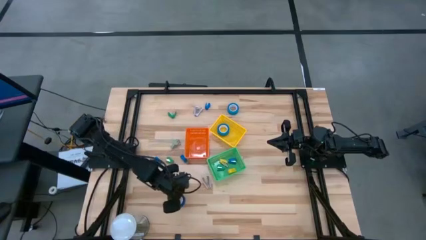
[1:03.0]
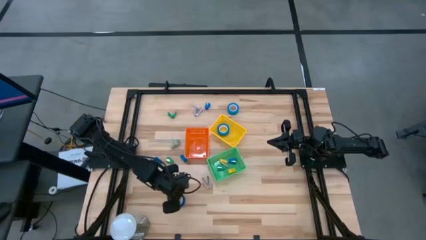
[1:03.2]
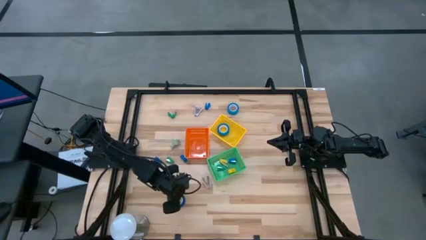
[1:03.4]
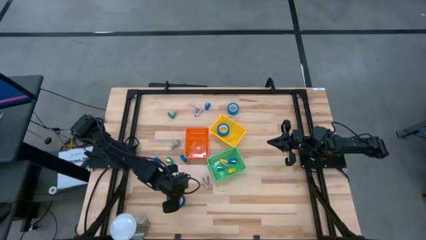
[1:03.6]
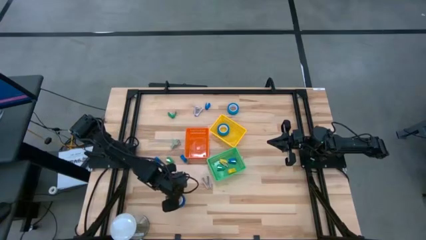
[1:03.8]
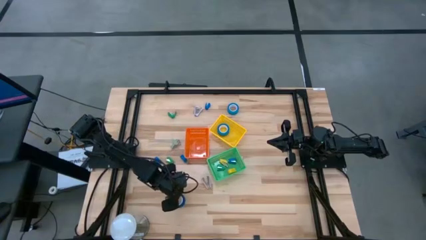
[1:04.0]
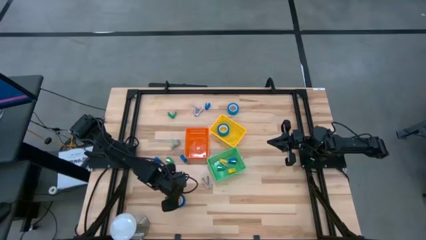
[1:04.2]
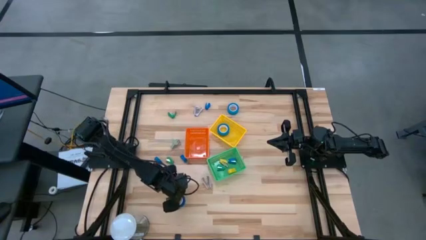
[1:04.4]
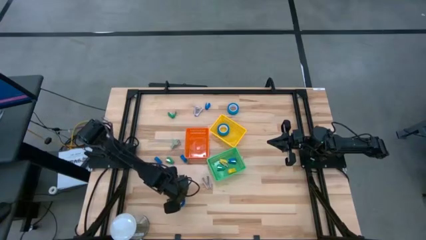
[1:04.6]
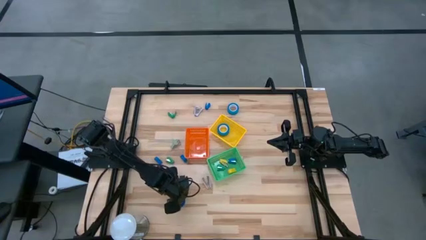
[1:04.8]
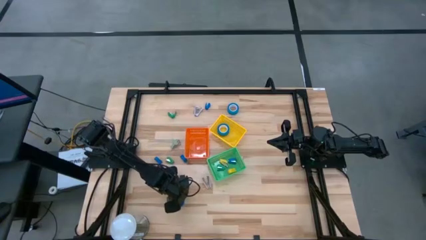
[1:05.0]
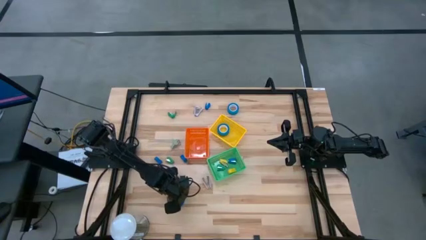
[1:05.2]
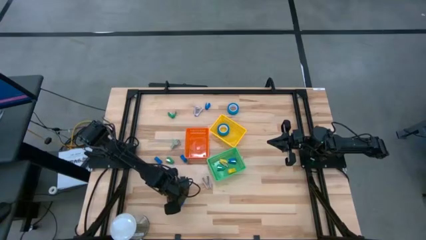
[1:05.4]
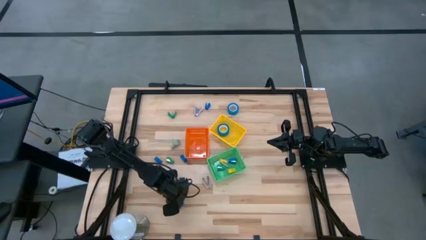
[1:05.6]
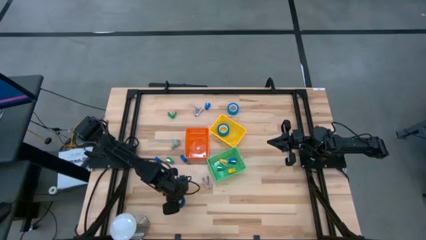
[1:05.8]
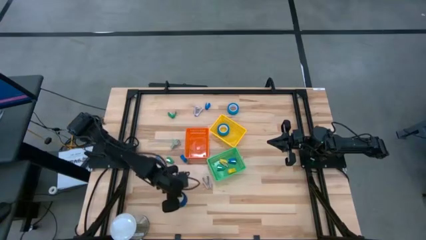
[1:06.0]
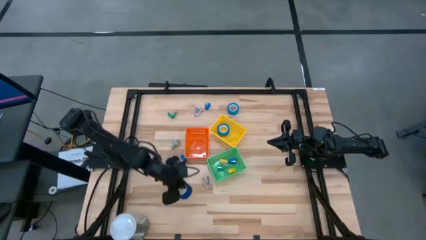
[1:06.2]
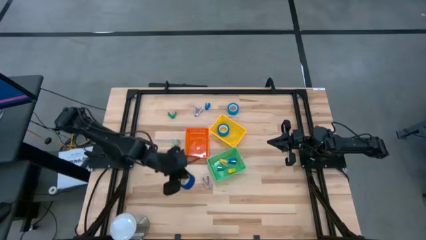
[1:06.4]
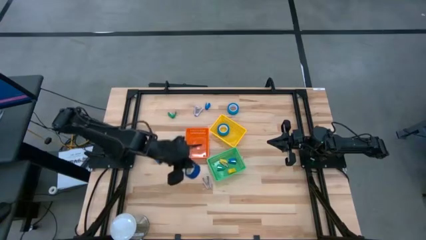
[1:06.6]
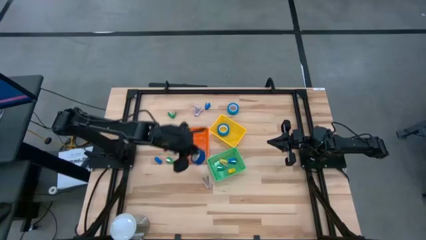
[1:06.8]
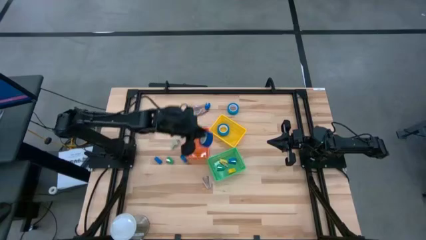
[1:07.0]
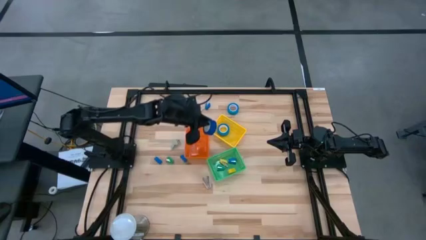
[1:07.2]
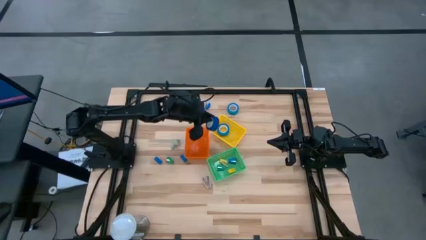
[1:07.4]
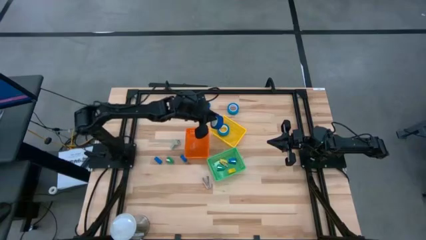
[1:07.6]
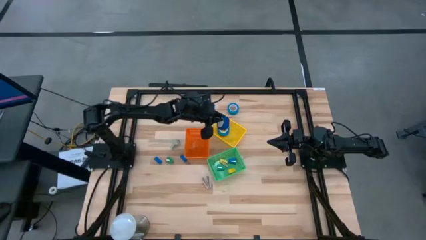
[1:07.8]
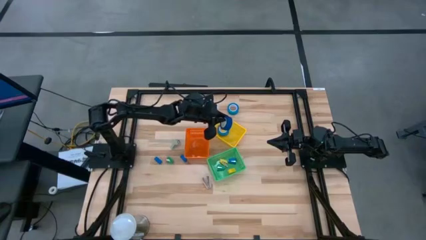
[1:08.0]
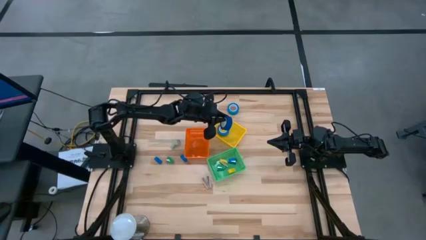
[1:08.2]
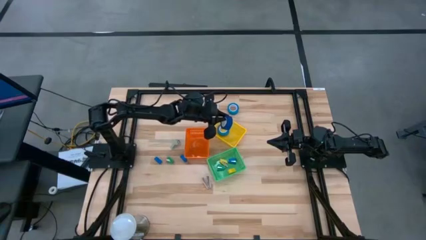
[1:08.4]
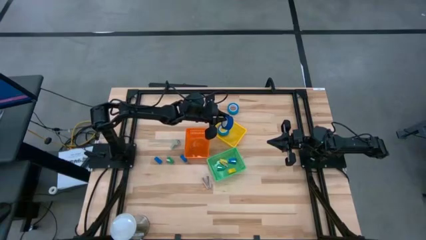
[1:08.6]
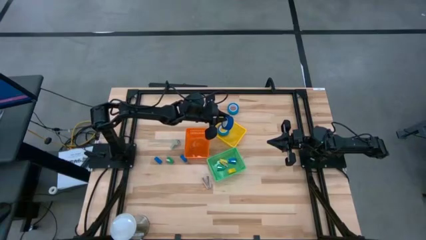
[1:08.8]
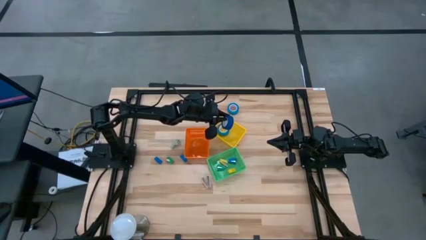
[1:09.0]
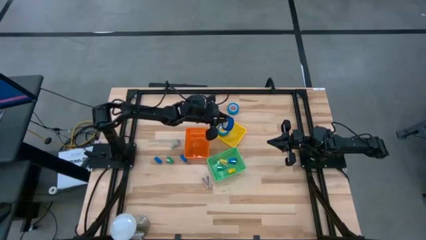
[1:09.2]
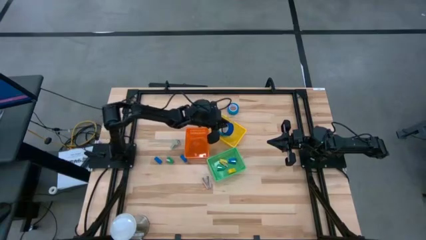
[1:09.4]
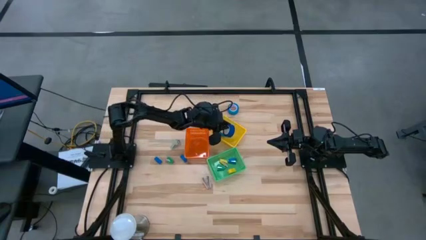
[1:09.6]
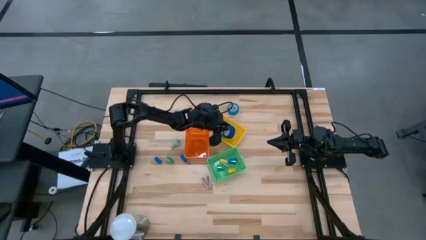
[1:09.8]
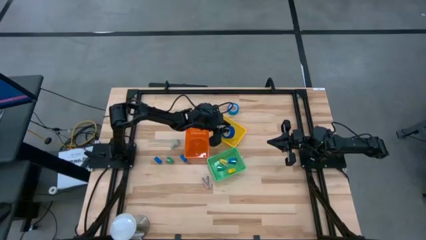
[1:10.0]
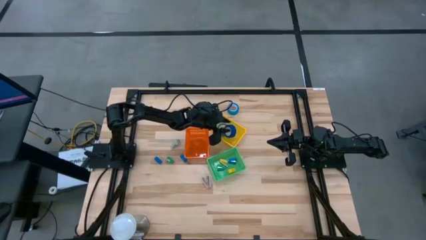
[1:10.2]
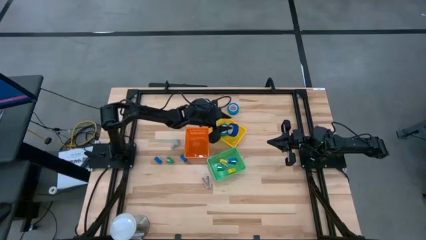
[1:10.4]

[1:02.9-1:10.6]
Task: Pick and place Stapler, Stapler remover, tape
Put the blue tape into the yellow bin

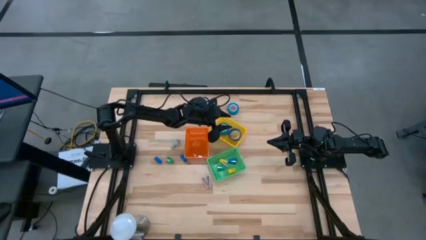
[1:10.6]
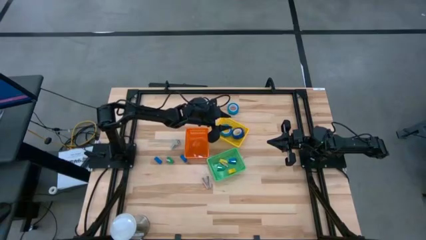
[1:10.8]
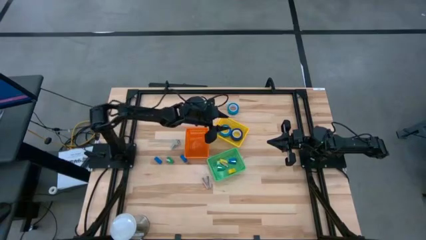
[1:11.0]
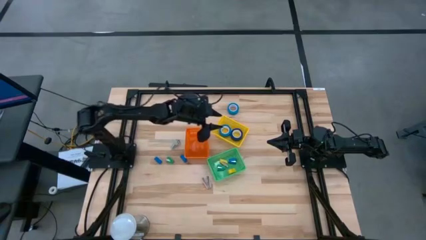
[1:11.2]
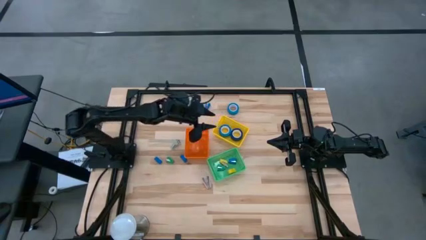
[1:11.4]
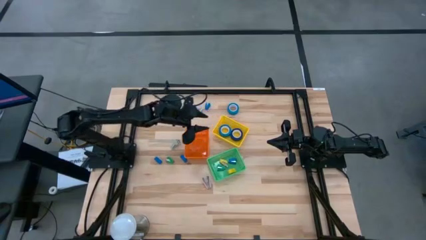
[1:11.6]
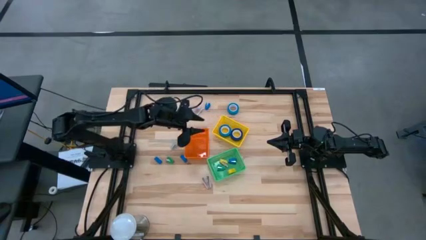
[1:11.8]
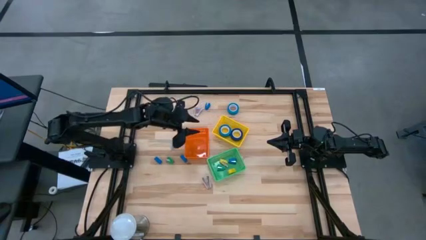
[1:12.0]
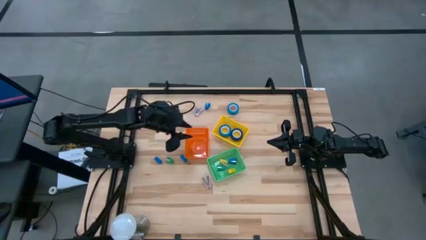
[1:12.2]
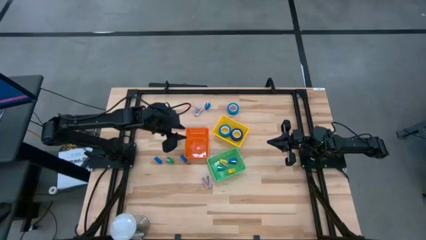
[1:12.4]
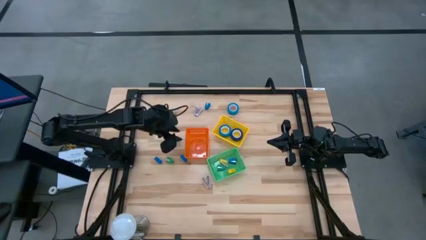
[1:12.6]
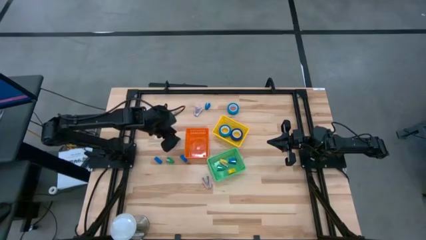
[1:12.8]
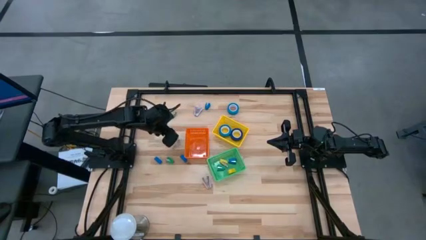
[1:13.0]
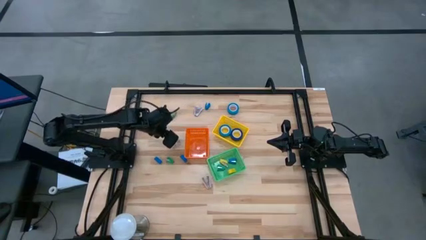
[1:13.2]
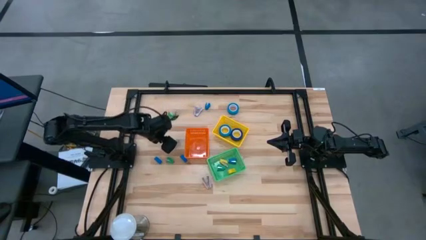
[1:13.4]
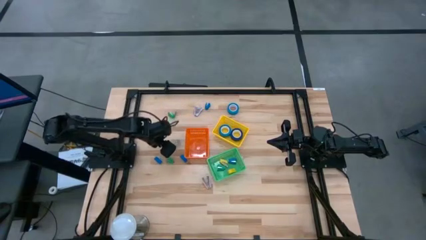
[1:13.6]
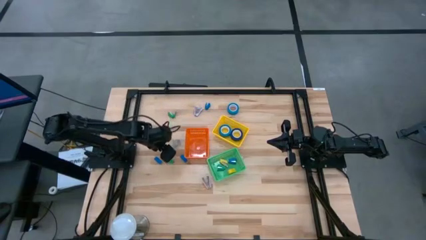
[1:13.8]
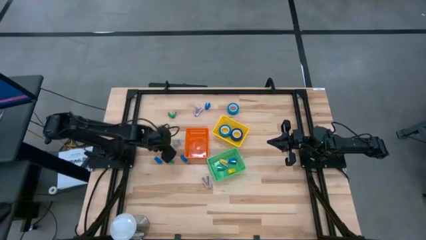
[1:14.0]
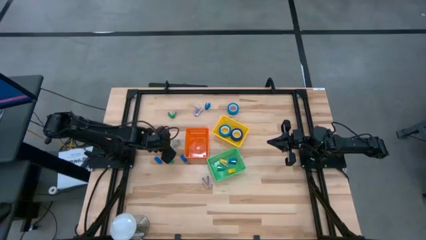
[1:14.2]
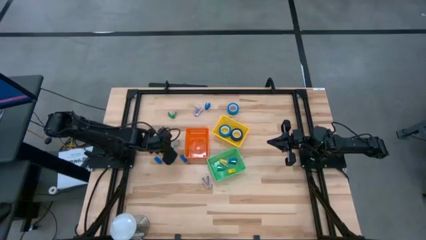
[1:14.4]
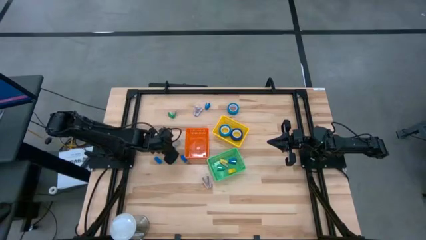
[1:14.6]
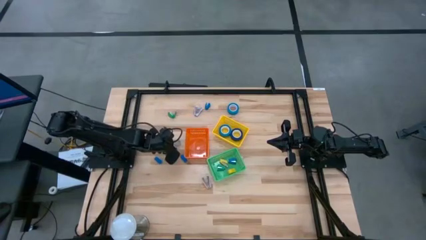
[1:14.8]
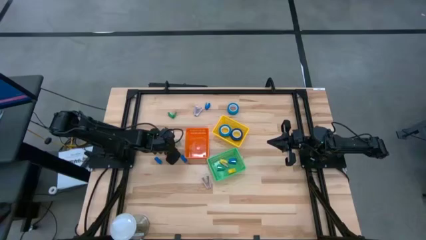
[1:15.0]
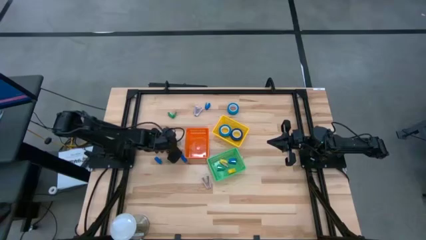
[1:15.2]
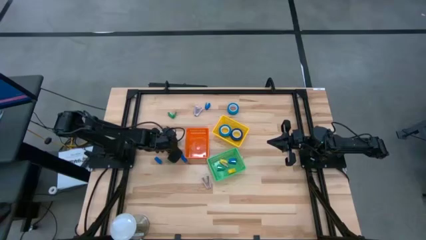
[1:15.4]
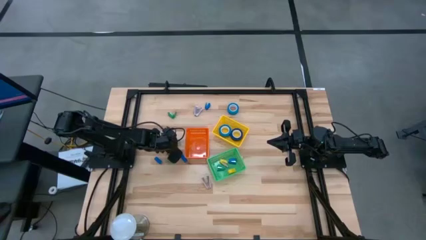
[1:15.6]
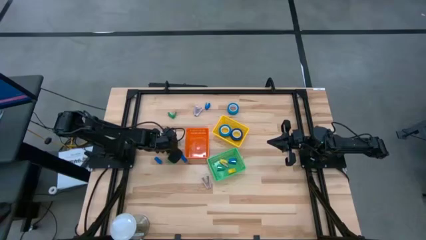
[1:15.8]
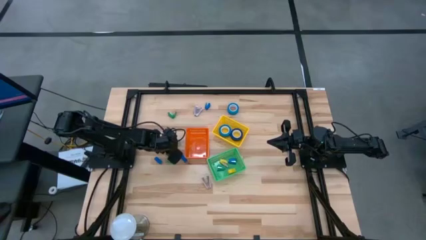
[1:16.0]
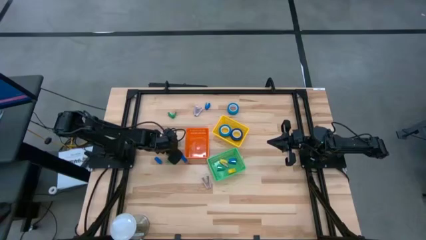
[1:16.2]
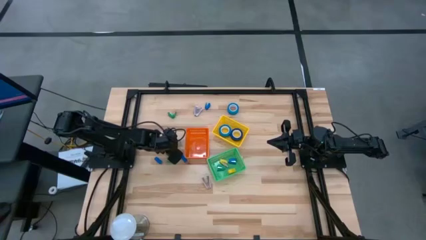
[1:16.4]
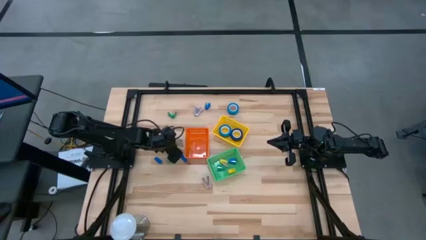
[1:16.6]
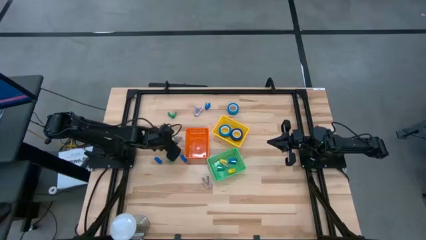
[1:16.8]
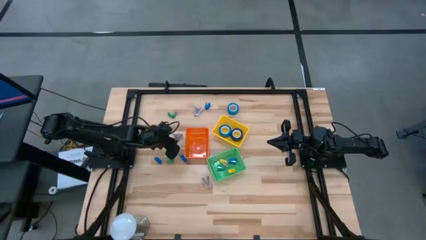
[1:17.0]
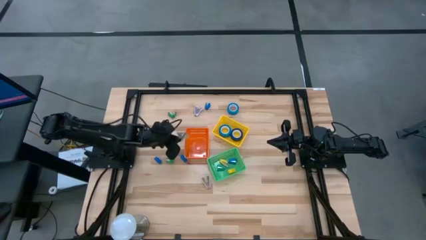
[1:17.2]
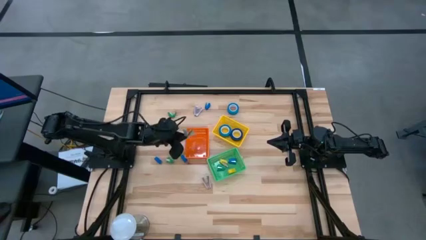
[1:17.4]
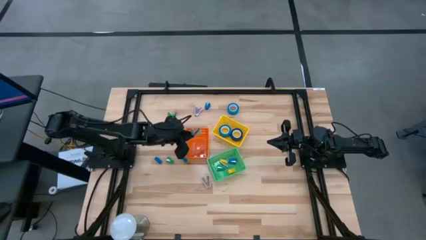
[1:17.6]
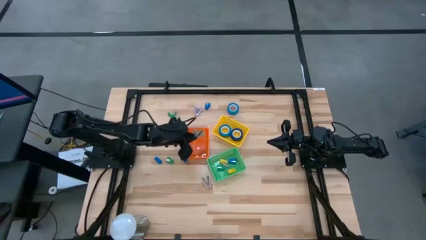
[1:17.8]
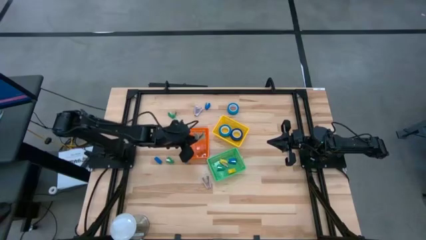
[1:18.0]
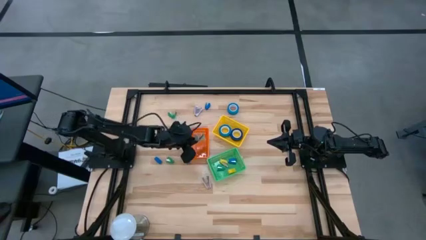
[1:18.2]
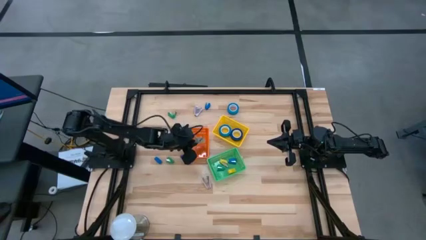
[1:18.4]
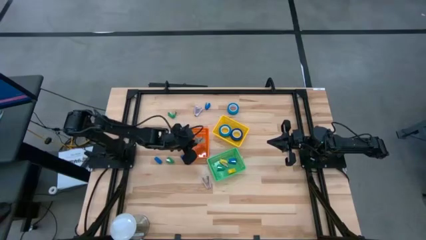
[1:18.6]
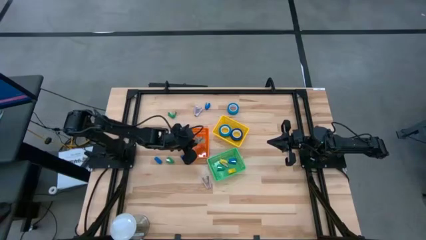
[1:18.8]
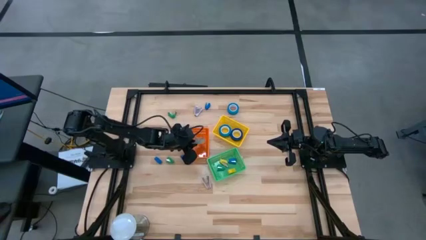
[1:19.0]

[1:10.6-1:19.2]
Put the gray stapler remover into the orange bin
